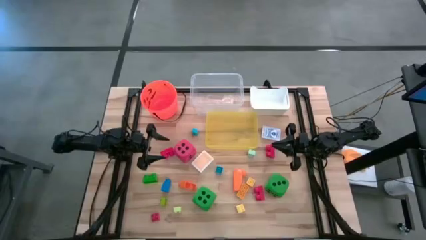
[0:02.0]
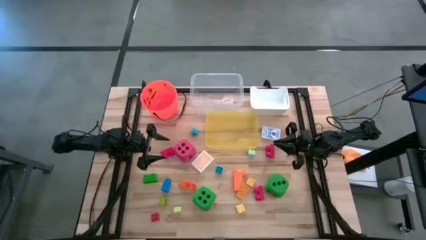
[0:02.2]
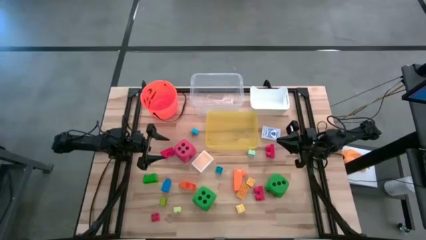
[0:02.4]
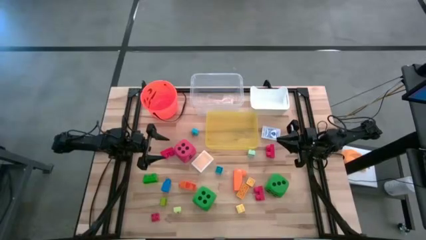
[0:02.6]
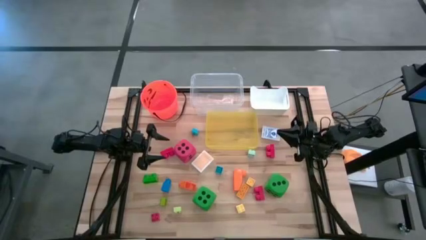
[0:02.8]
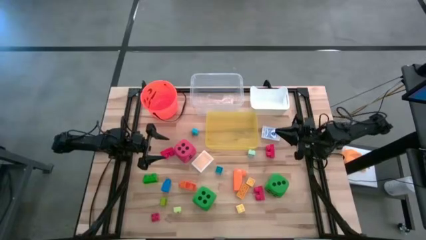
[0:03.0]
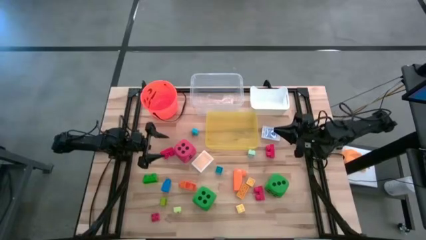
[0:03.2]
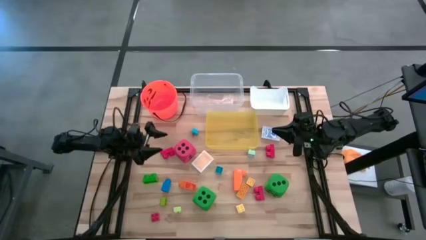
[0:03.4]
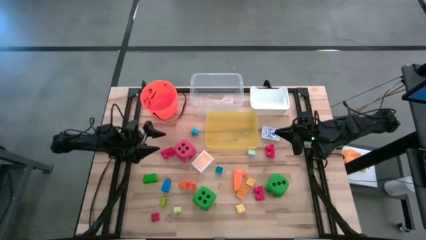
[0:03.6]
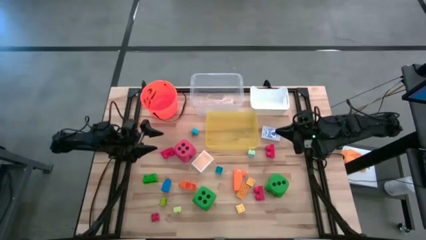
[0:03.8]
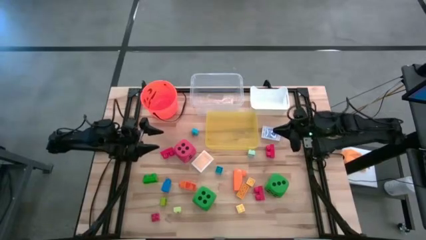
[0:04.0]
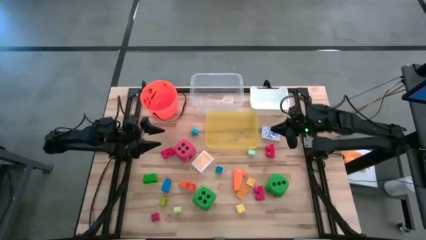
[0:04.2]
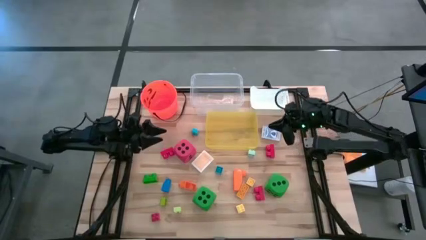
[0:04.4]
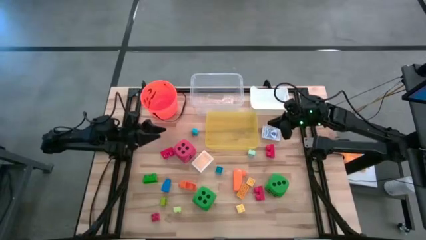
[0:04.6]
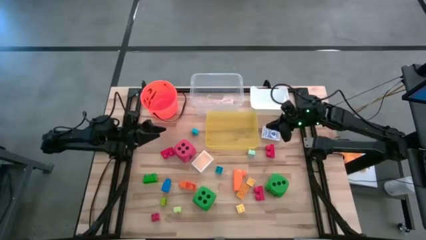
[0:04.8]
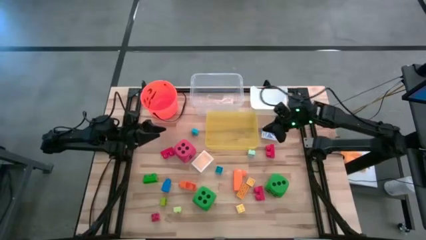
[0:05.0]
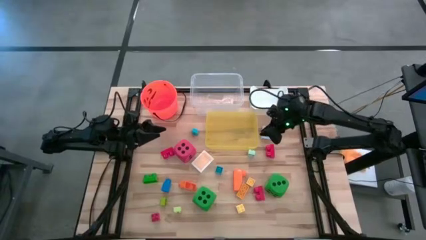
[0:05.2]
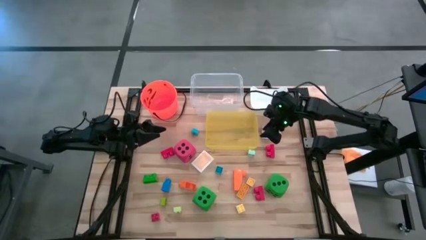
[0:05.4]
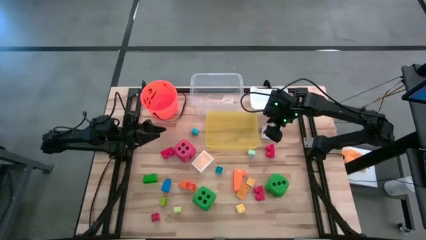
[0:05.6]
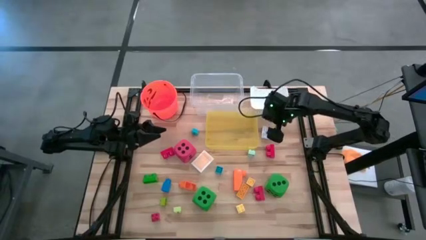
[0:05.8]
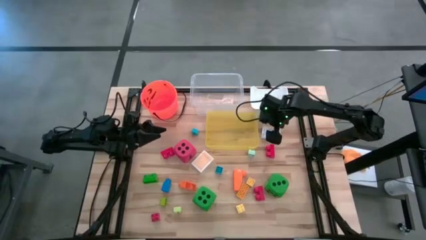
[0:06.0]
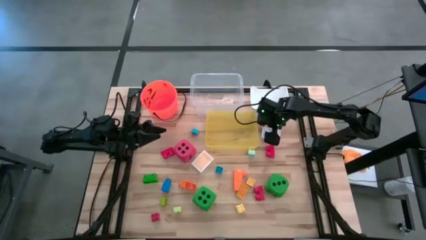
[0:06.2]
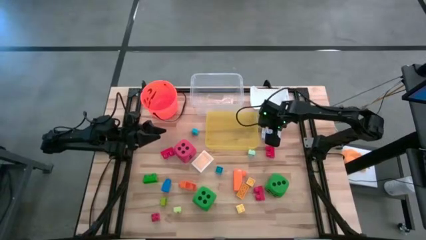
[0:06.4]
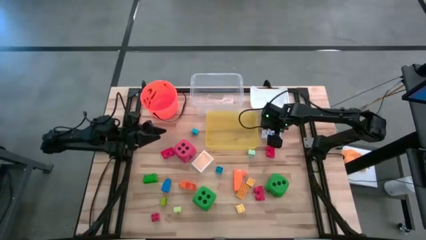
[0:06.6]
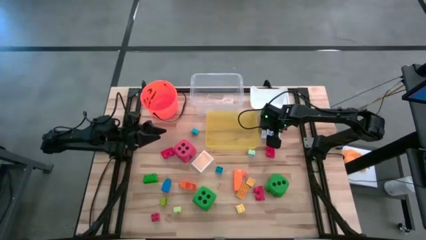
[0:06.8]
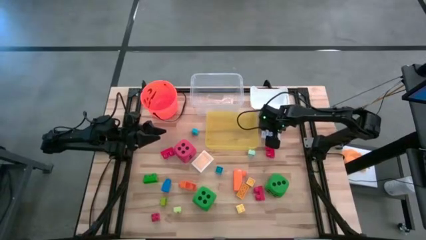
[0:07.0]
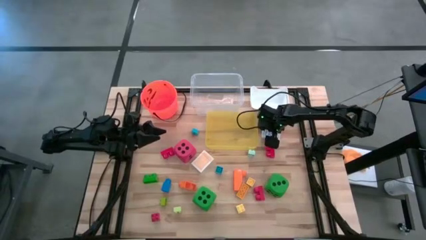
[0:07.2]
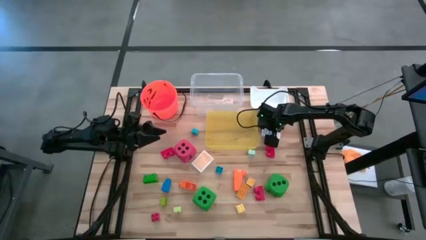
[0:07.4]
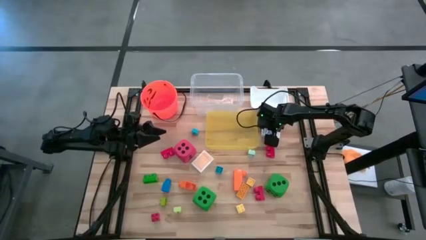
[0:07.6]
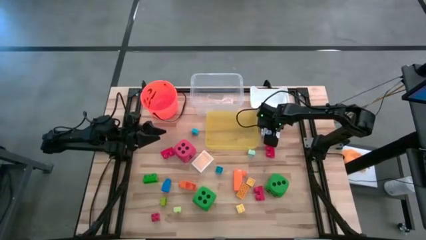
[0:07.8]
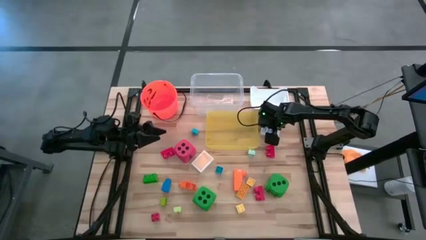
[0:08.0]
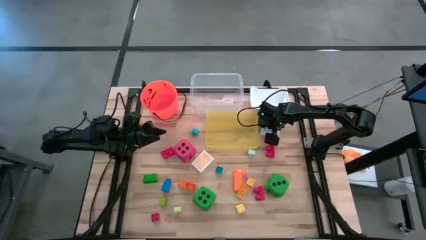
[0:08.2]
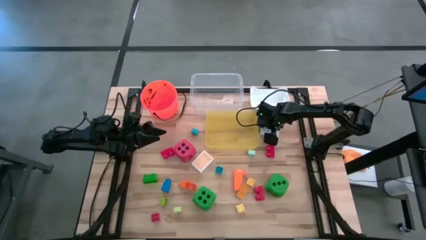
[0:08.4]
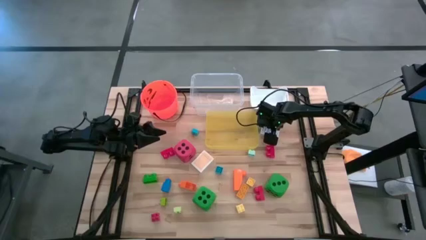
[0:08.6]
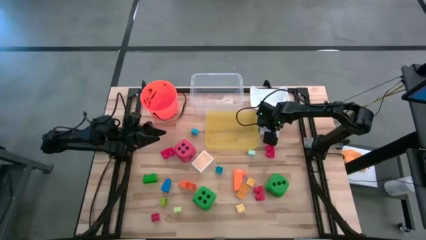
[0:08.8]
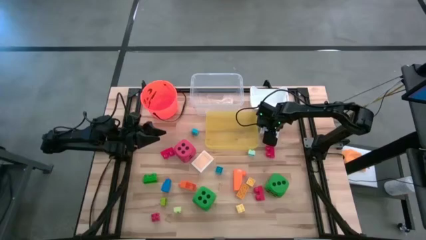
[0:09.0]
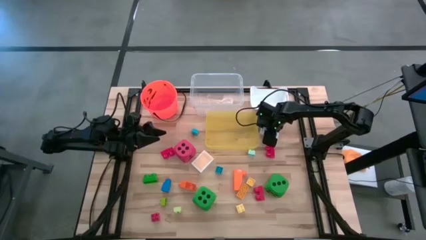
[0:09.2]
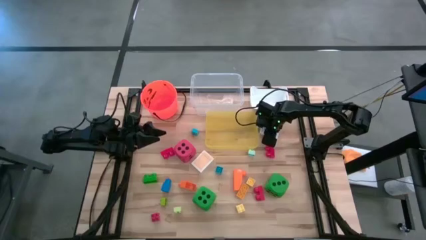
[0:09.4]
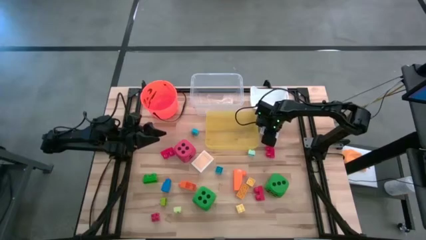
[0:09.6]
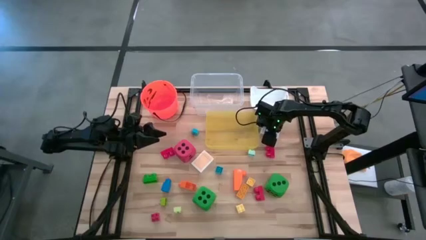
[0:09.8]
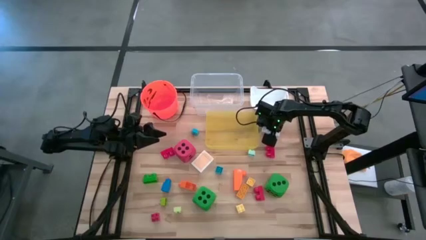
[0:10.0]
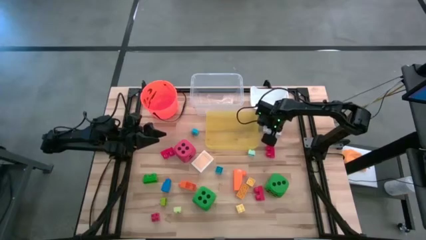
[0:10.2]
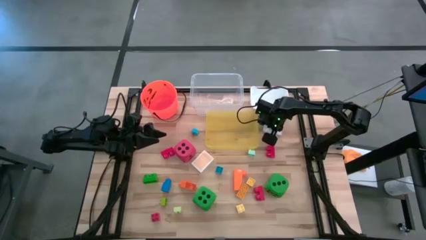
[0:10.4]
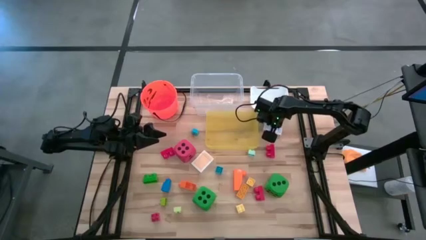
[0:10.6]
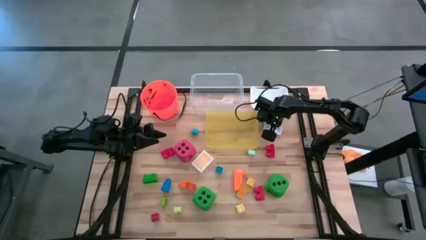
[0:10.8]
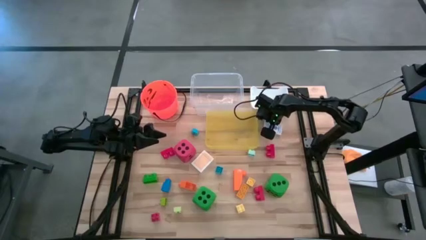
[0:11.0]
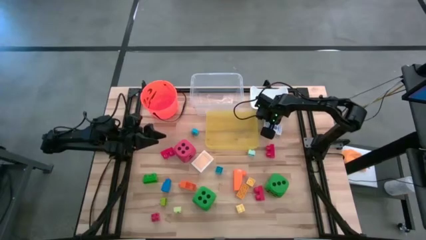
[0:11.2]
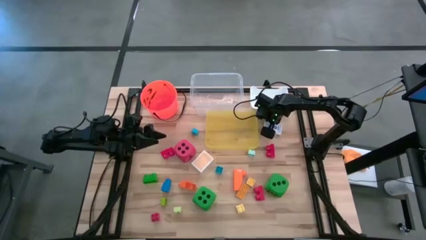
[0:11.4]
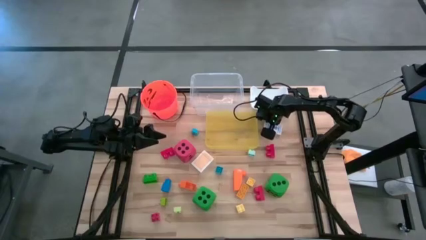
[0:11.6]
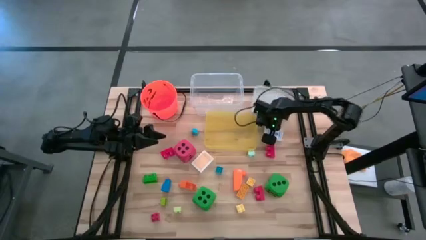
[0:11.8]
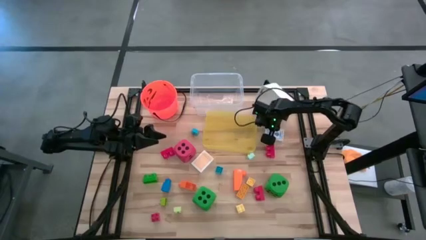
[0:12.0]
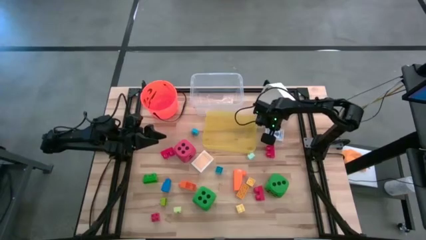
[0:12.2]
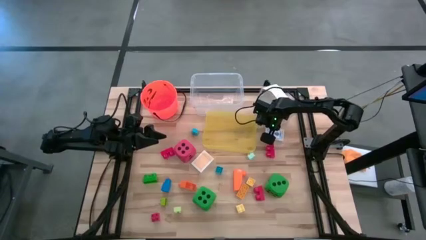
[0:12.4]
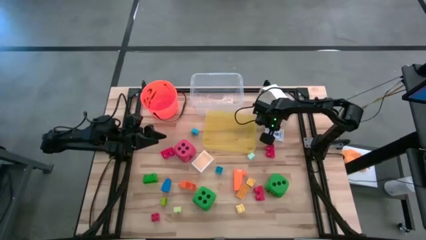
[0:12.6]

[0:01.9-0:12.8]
Task: Pick & Place Toys
Put the blue game card into the white bin

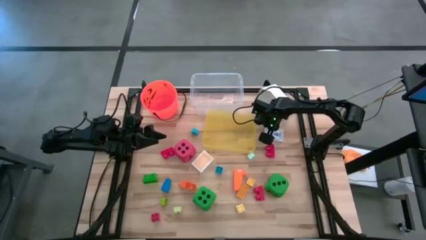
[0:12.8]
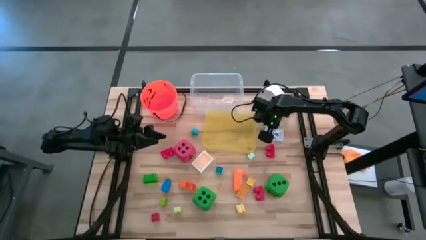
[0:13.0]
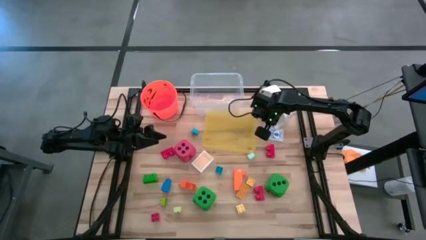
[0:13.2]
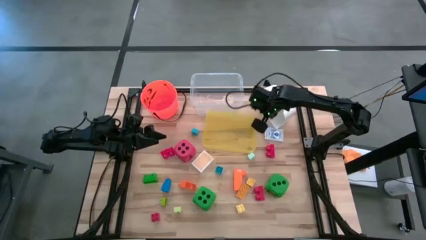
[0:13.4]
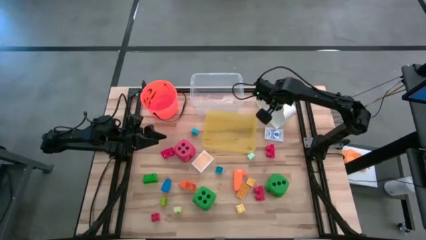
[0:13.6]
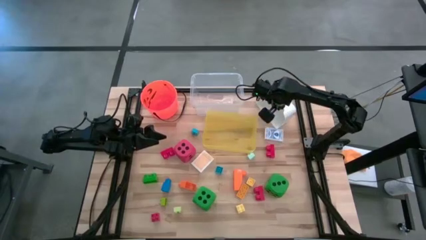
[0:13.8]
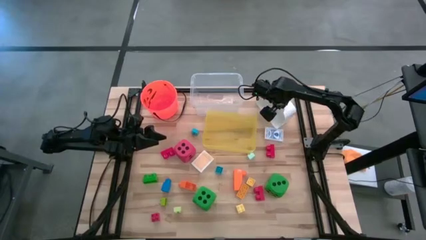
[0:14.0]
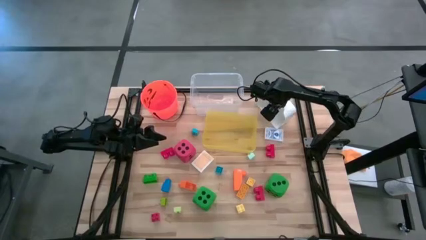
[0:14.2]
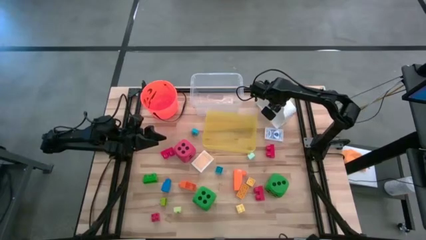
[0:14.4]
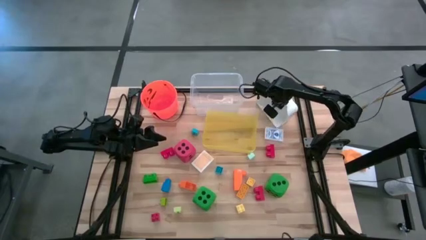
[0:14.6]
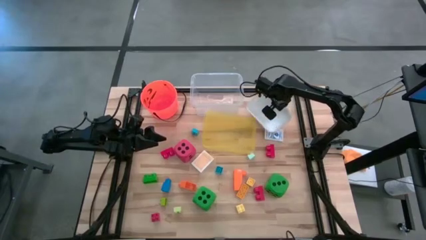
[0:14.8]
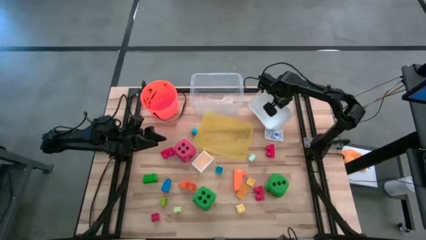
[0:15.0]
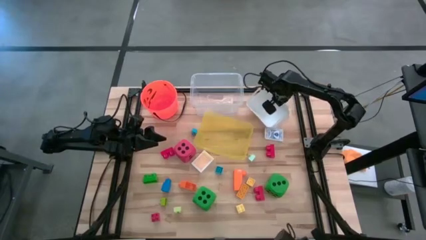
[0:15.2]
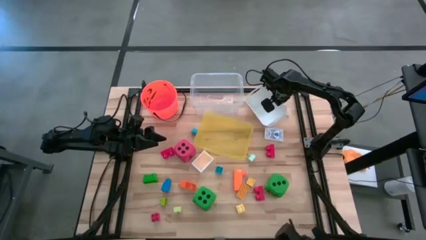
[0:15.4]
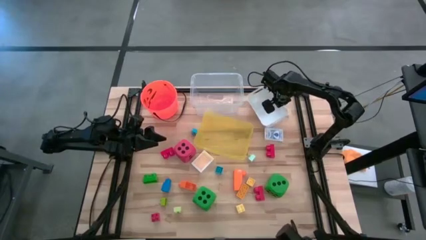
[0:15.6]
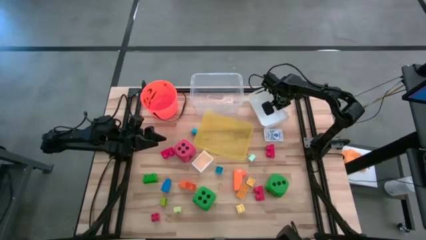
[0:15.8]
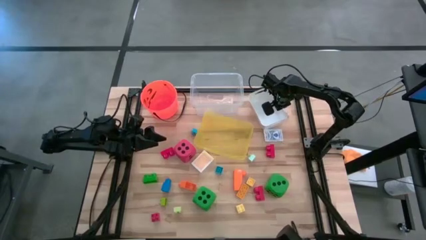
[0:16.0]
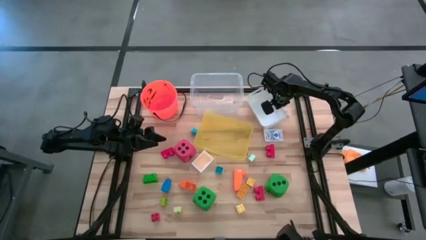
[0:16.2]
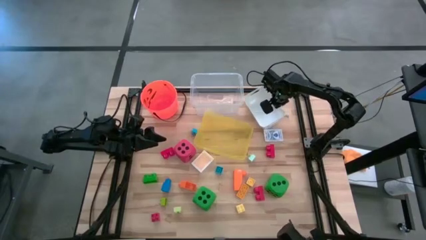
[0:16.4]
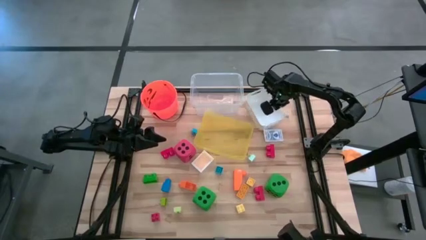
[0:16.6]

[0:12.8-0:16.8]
Adjust the white bin
